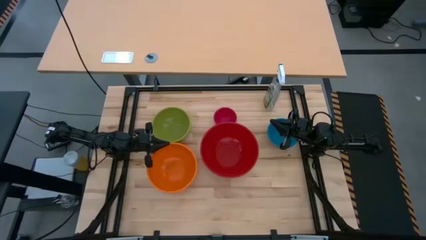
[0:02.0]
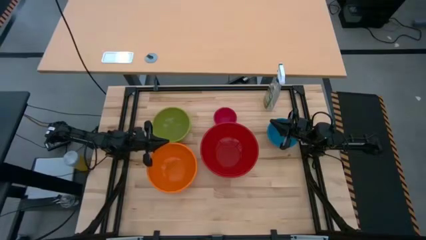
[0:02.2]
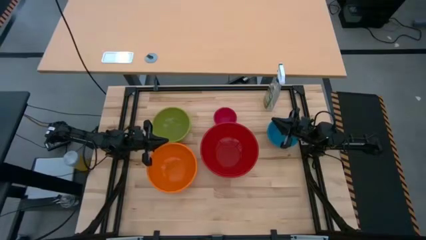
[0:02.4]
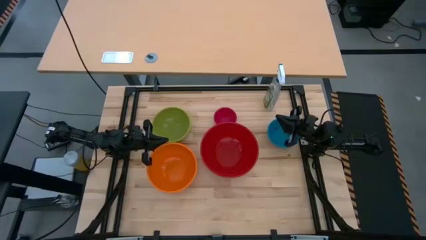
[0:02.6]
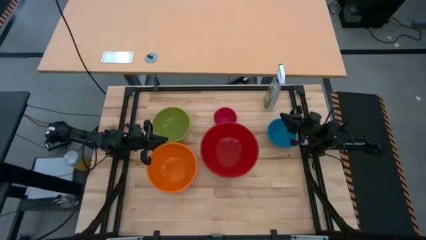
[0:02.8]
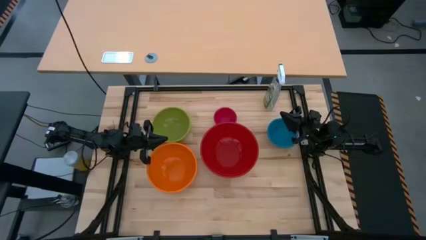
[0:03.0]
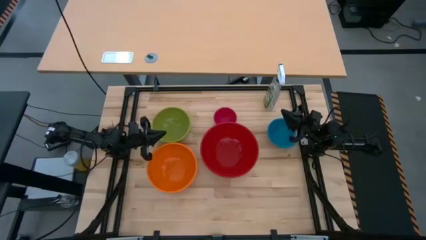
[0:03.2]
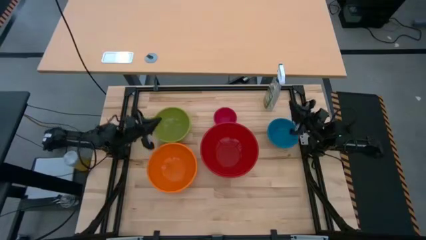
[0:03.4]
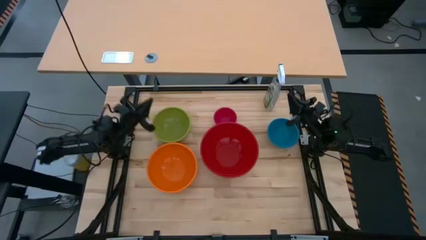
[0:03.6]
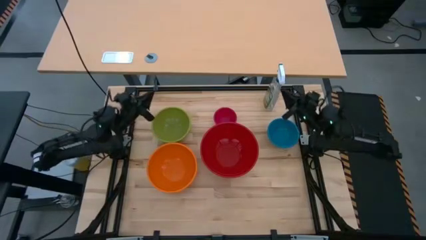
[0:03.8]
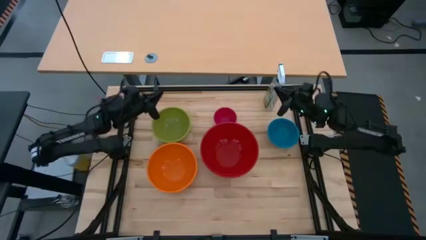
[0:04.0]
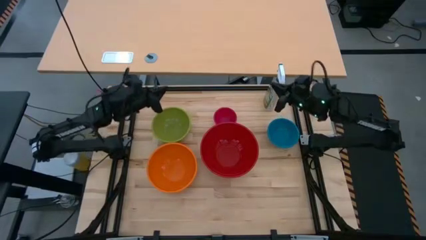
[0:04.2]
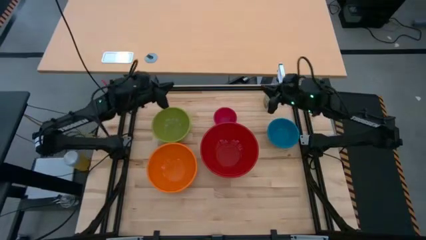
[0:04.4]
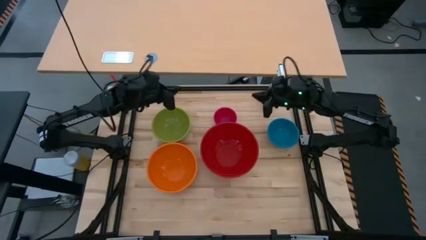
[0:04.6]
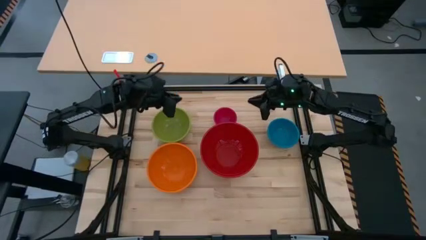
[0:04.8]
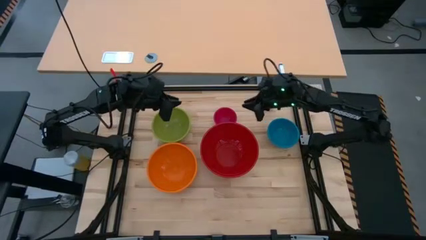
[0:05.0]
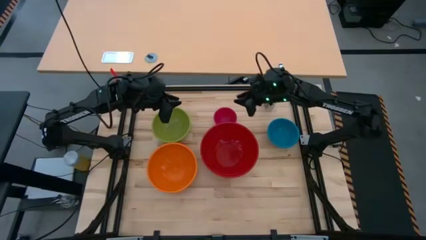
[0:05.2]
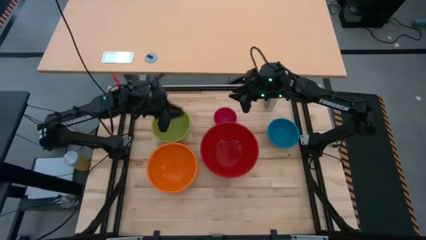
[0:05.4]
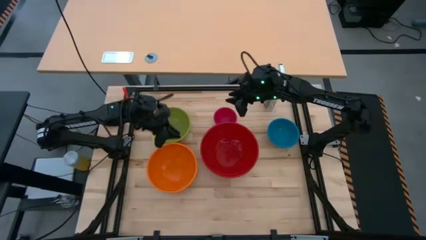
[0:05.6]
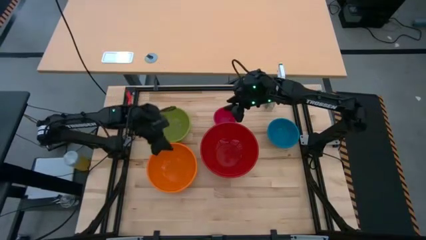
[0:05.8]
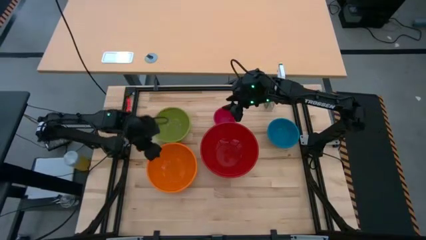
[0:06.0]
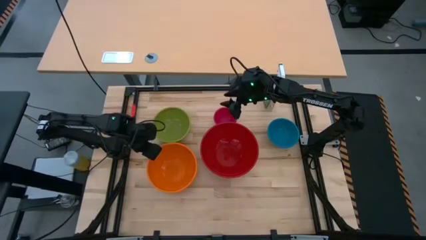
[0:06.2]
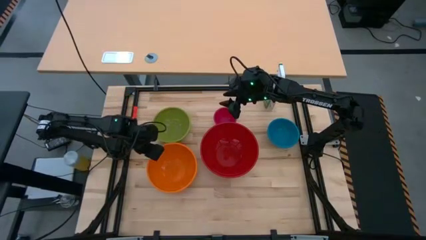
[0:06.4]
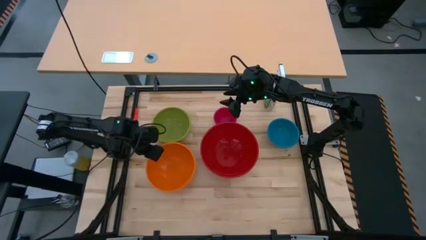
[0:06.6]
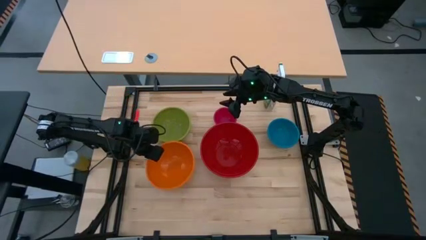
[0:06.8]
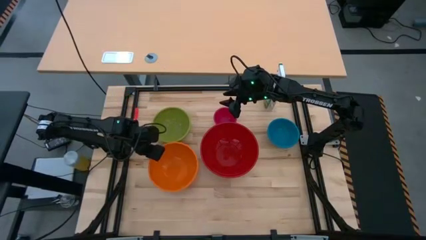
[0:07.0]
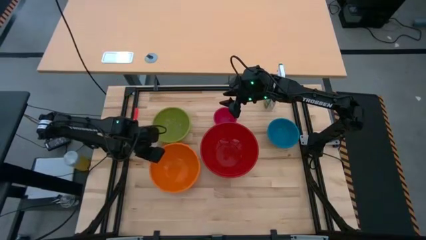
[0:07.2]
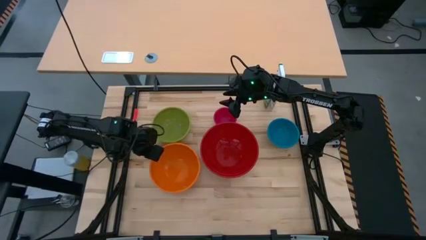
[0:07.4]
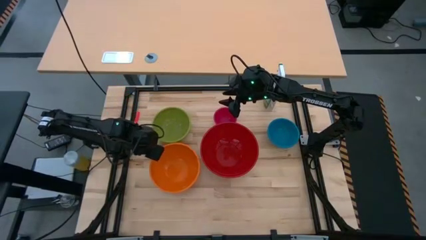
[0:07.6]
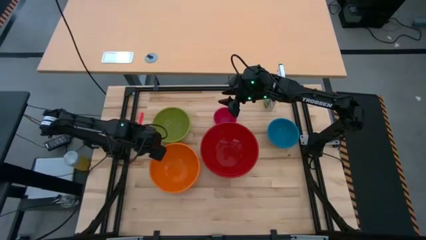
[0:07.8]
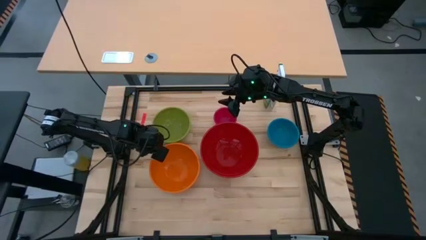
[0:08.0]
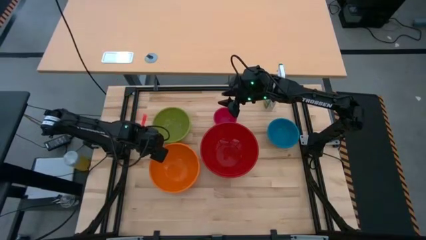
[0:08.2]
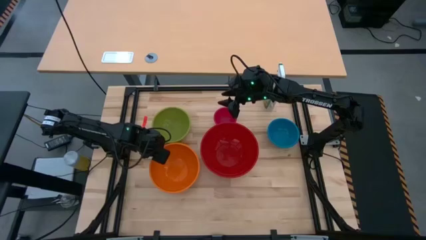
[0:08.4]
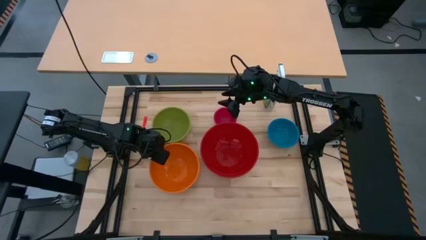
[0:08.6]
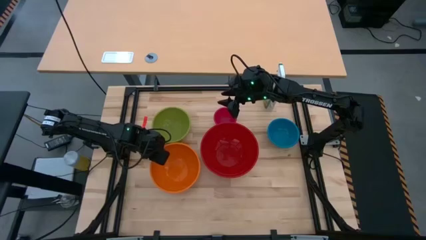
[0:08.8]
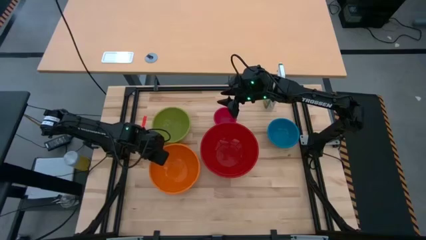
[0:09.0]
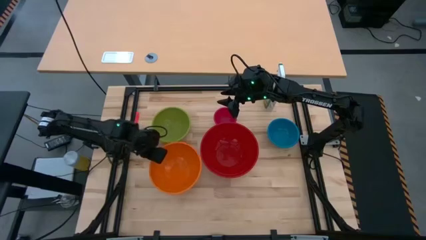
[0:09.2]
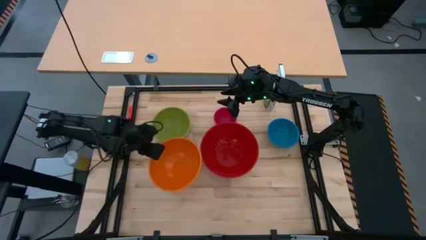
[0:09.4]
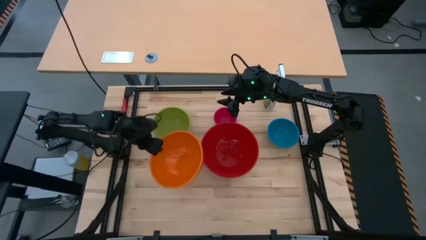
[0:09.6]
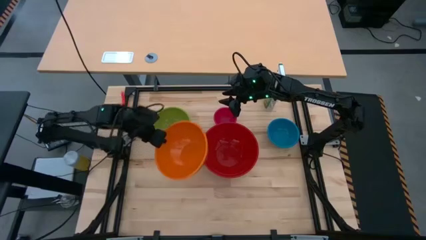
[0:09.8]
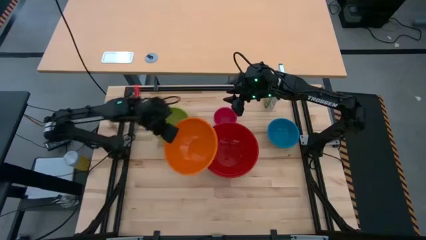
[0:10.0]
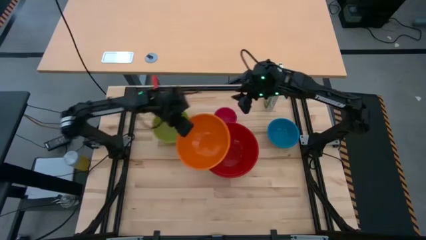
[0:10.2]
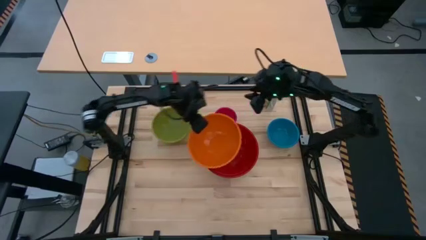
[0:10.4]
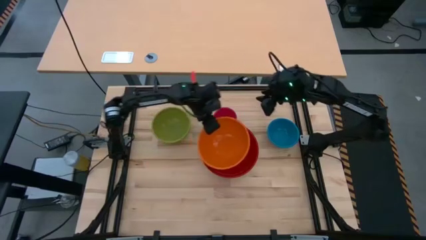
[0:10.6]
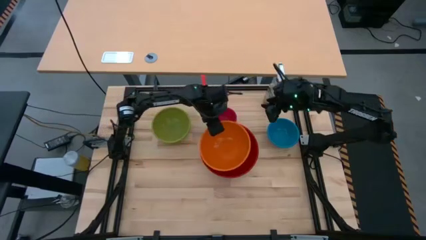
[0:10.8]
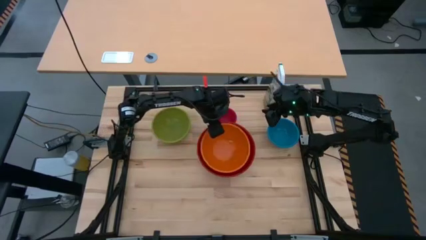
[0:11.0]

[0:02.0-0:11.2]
Stack the orange bowl on the big red bowl

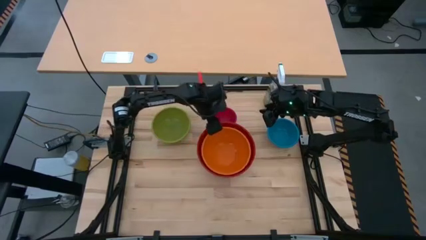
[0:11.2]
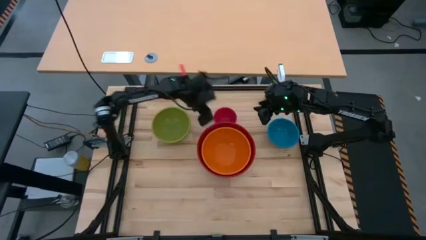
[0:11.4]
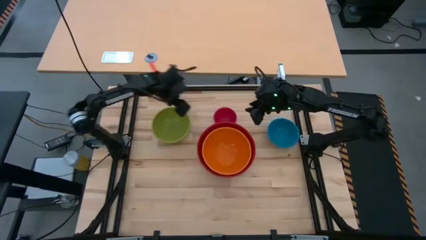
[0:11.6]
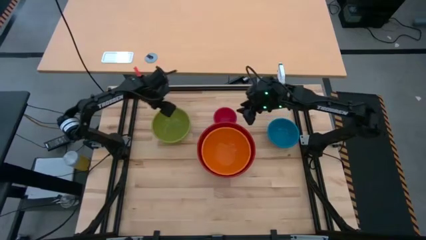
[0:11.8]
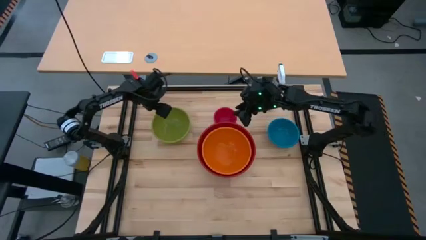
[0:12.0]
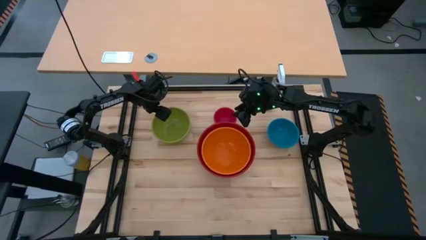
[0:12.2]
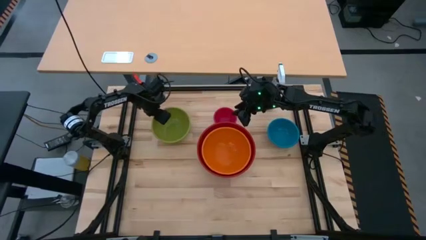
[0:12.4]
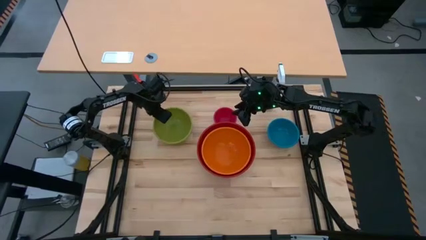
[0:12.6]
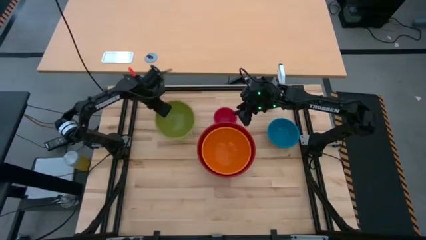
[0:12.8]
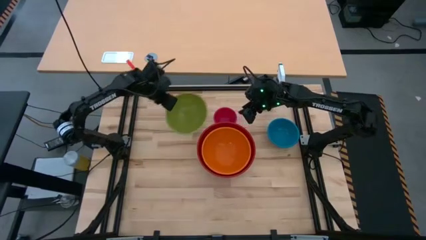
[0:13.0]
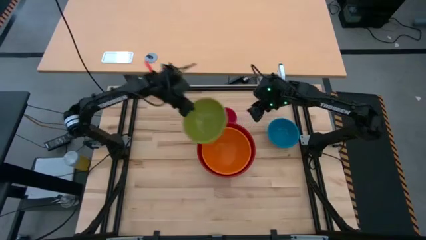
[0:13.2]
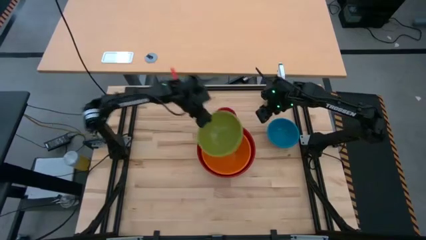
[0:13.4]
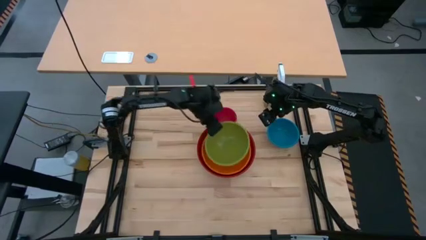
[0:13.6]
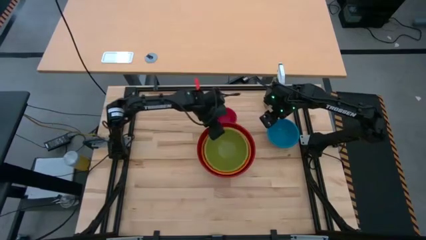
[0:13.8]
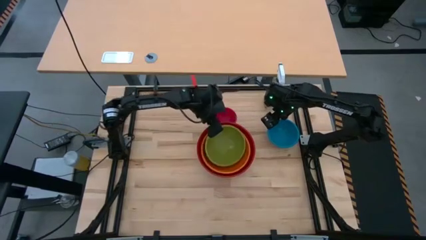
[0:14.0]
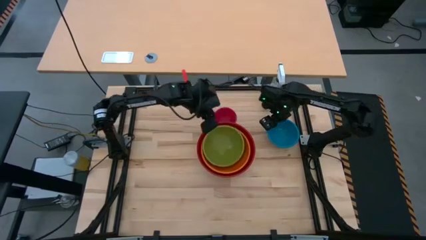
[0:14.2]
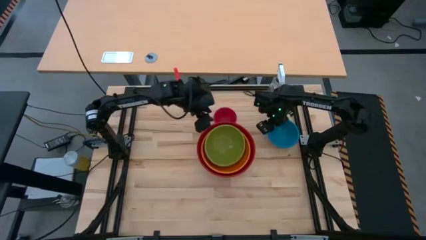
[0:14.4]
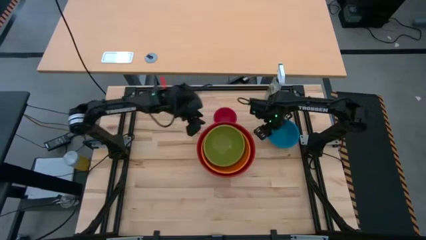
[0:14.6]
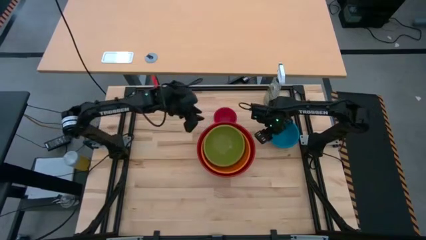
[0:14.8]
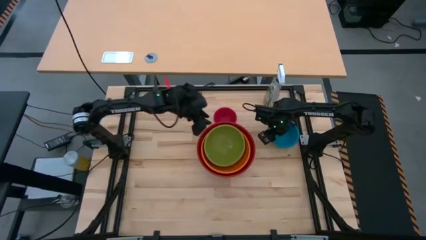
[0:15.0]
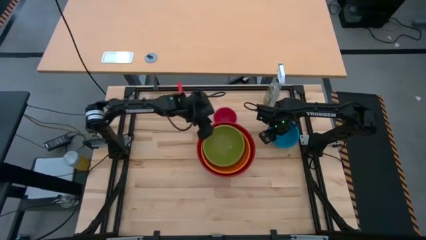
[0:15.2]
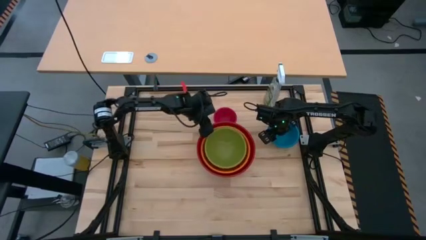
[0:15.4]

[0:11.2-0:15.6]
Stack the green bowl on the orange bowl

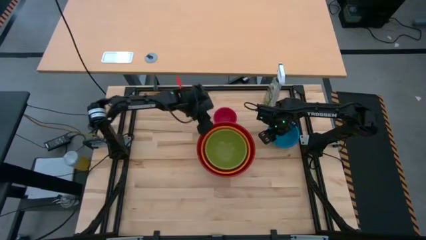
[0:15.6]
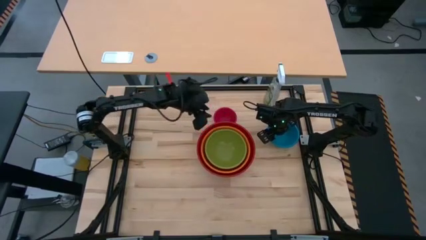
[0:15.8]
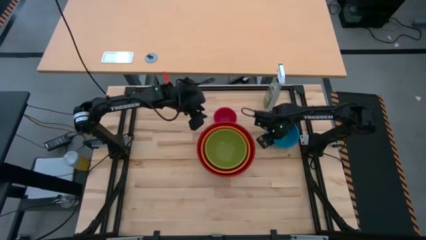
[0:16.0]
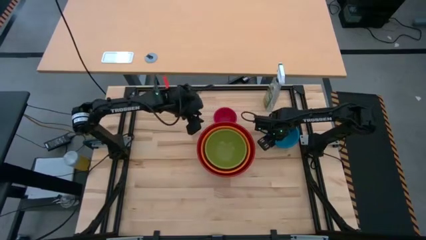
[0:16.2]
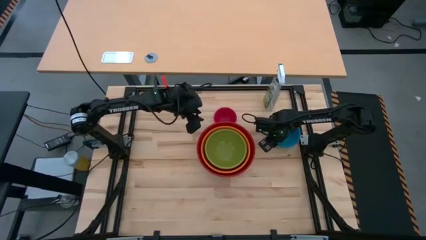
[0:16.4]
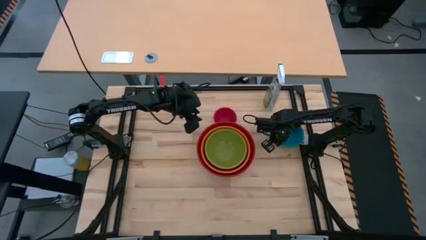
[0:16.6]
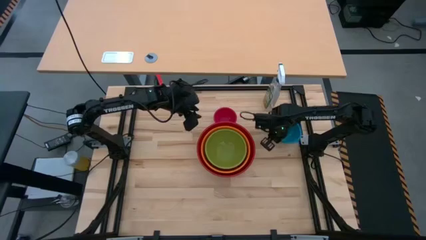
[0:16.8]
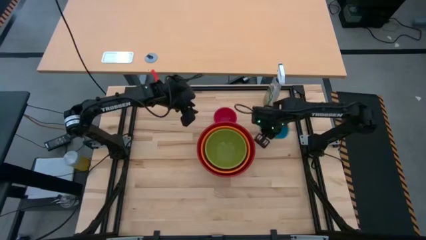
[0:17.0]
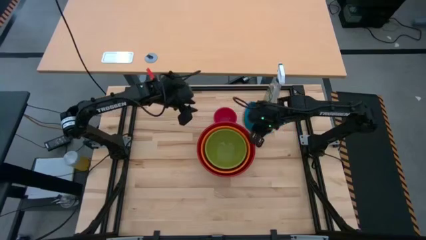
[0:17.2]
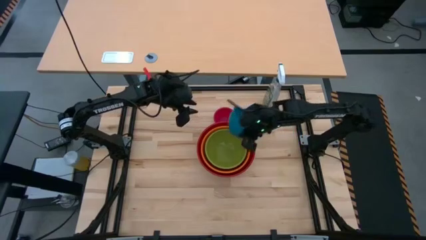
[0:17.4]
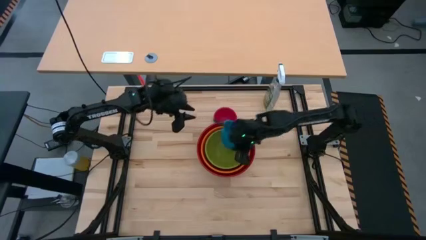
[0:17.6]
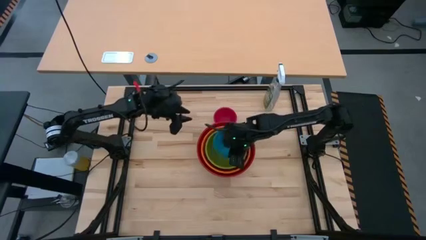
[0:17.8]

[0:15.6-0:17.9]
Stack the blue bowl on the green bowl

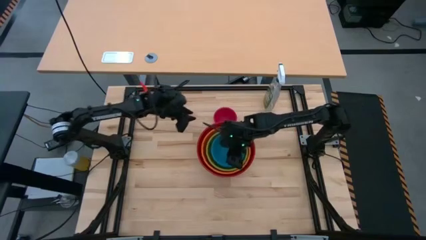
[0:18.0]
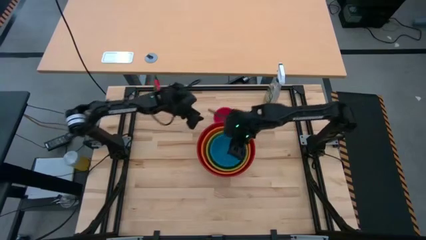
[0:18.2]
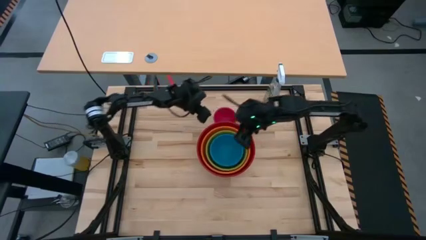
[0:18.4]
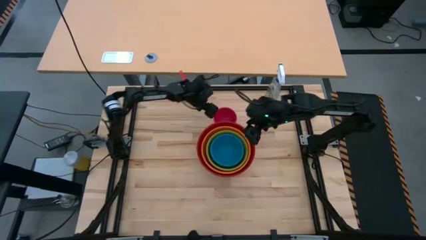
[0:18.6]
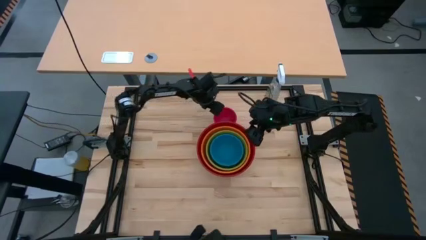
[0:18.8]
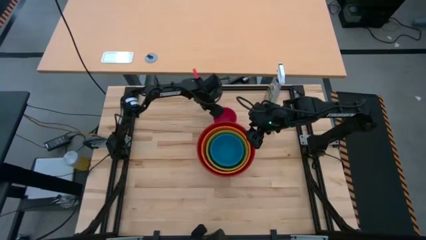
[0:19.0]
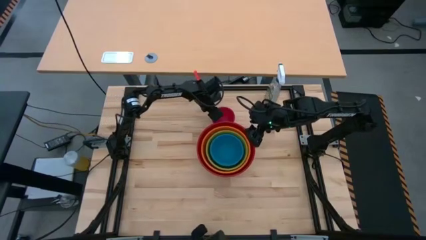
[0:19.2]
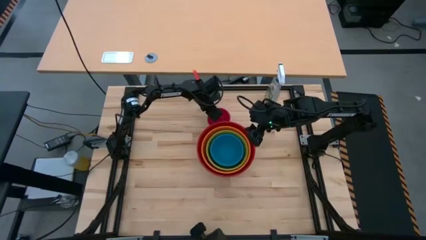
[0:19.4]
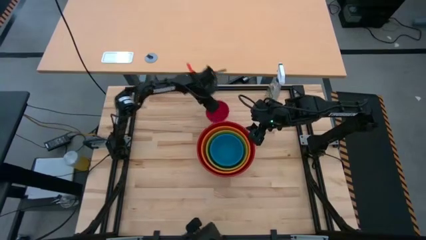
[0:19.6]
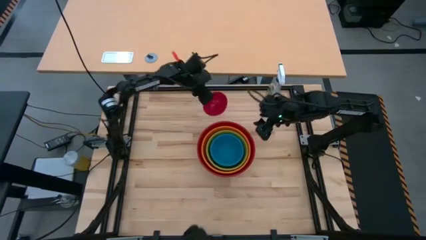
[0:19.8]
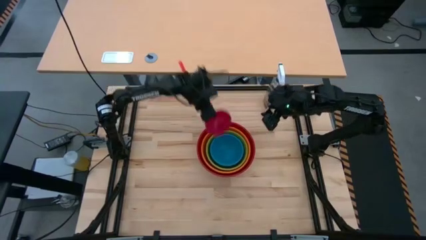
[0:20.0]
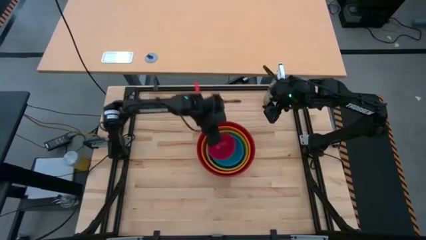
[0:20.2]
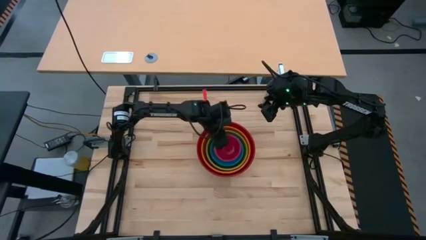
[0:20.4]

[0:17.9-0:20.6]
Stack the small red bowl on the blue bowl
